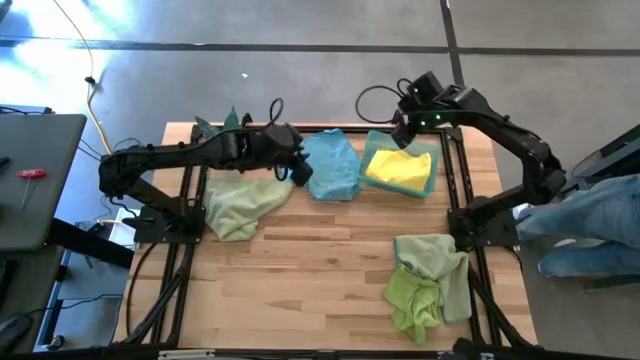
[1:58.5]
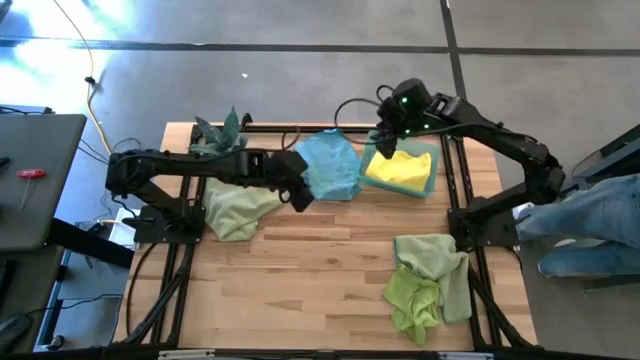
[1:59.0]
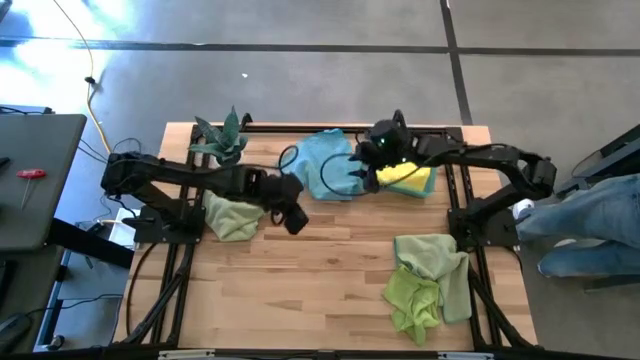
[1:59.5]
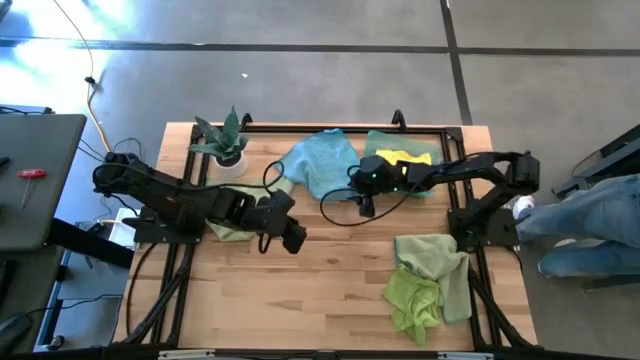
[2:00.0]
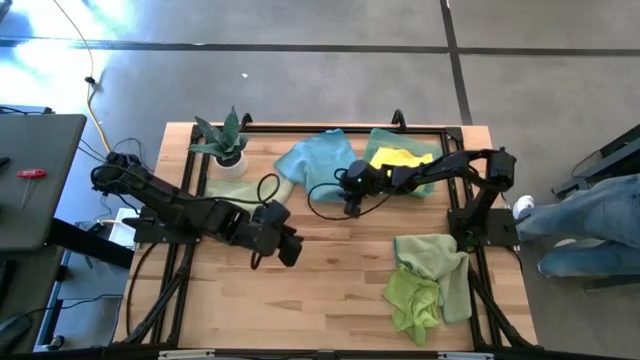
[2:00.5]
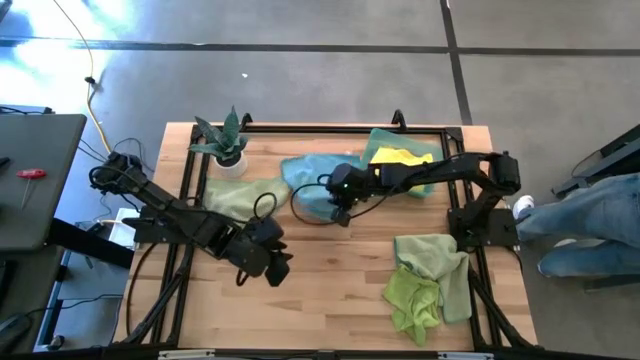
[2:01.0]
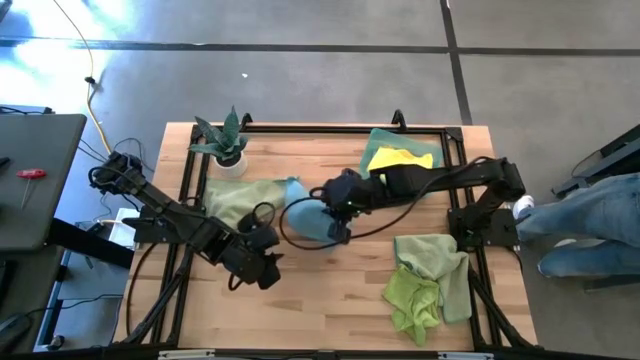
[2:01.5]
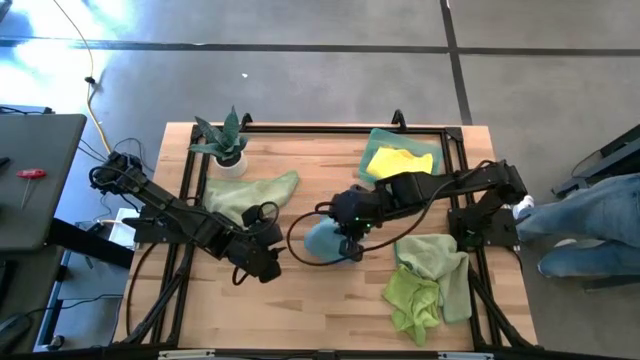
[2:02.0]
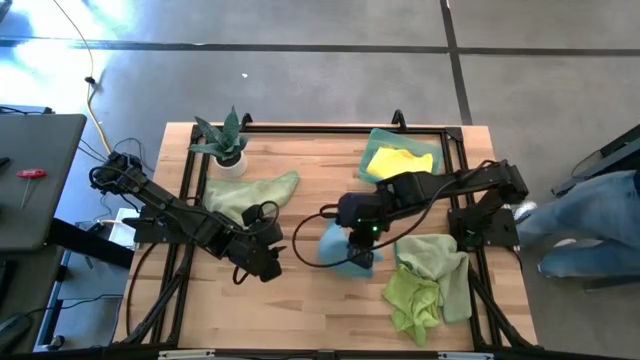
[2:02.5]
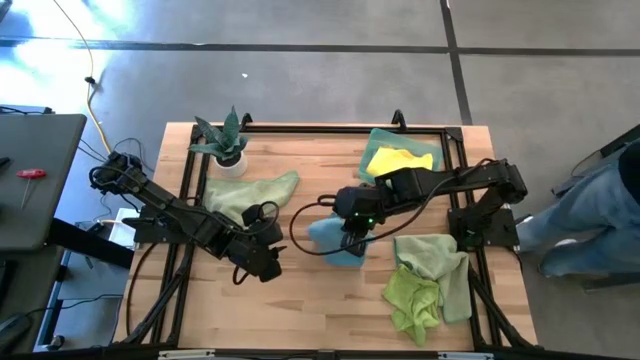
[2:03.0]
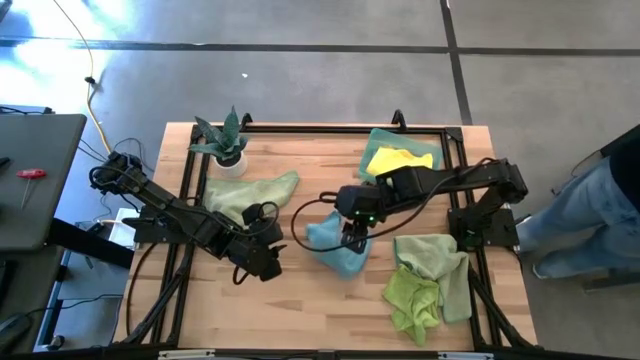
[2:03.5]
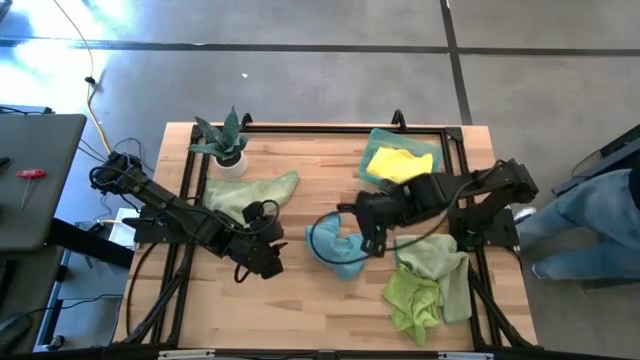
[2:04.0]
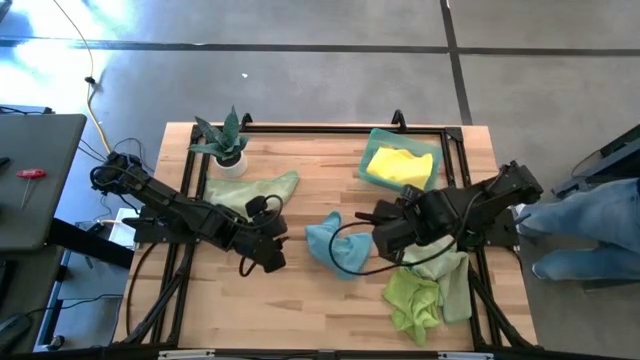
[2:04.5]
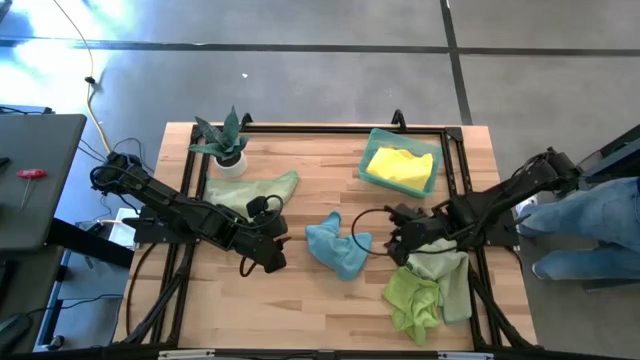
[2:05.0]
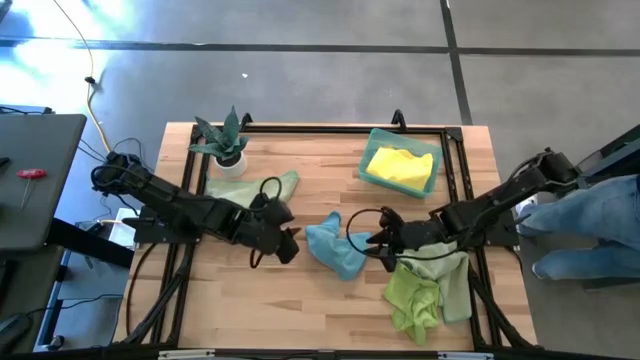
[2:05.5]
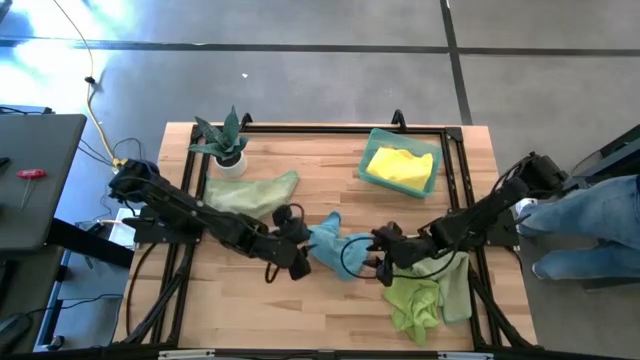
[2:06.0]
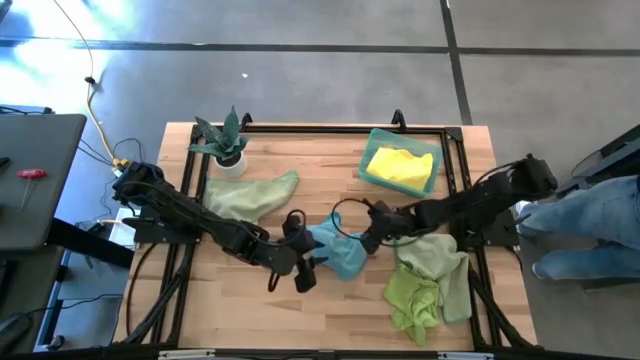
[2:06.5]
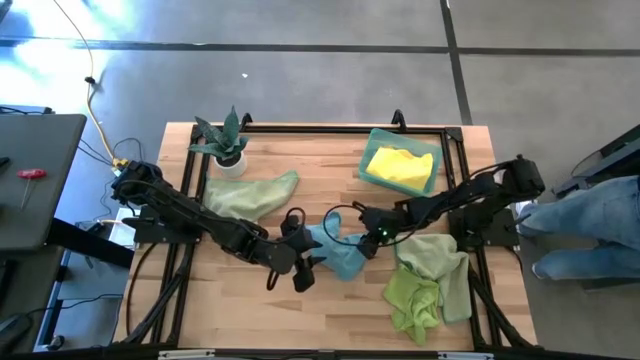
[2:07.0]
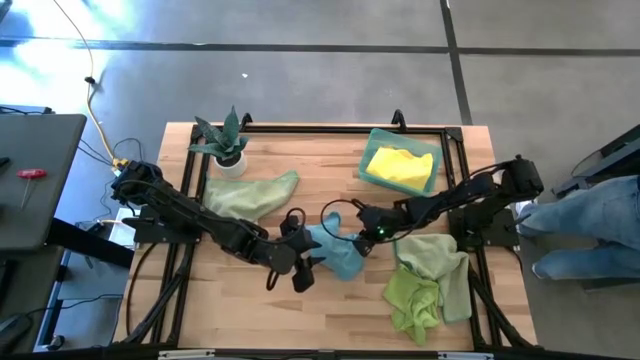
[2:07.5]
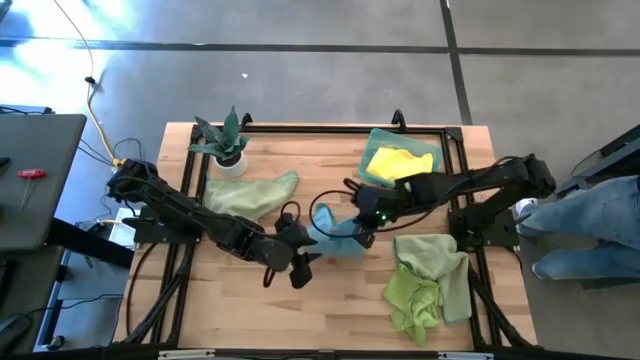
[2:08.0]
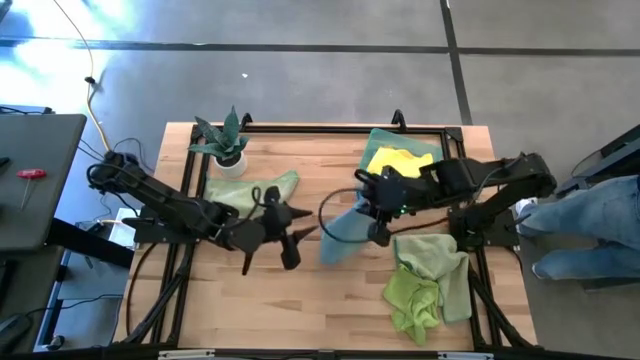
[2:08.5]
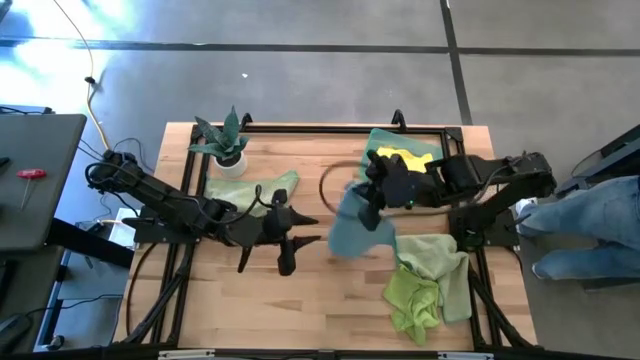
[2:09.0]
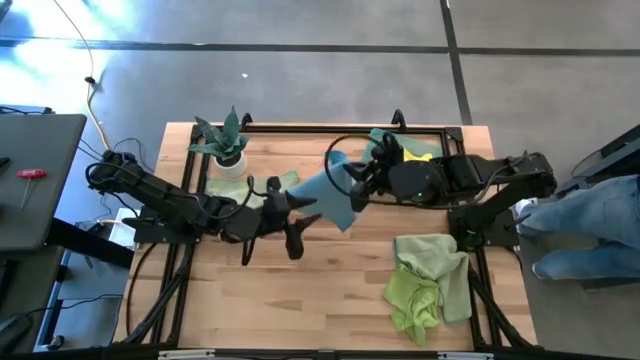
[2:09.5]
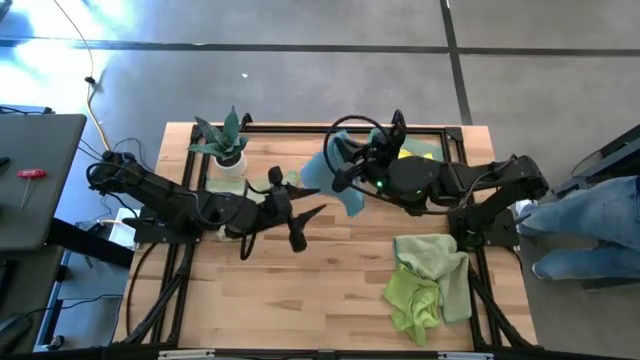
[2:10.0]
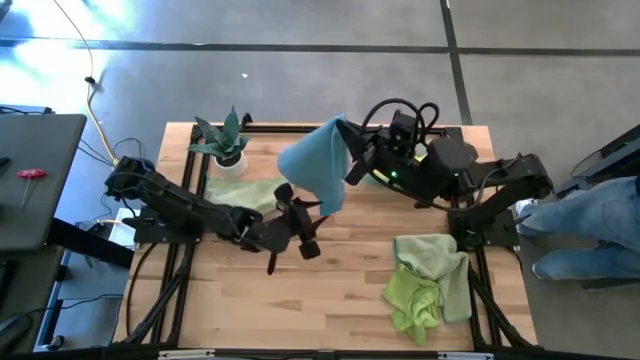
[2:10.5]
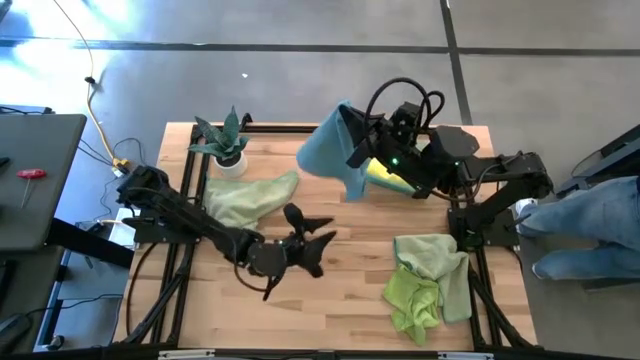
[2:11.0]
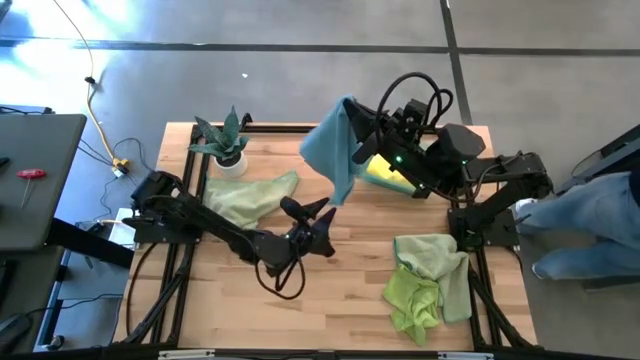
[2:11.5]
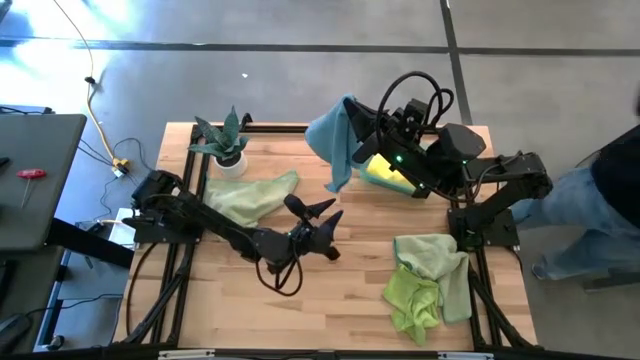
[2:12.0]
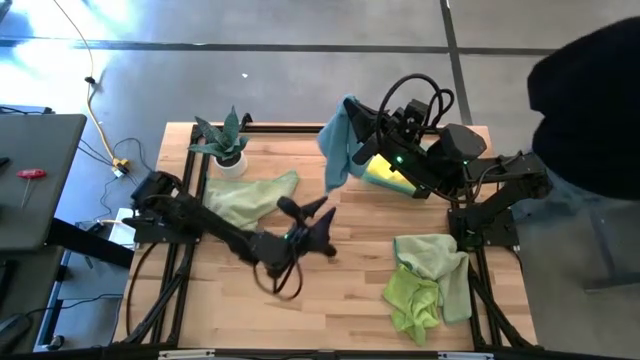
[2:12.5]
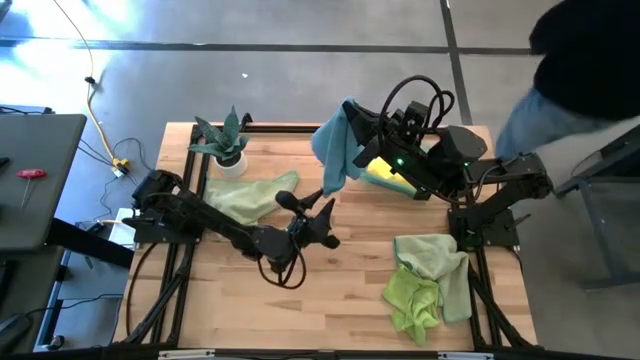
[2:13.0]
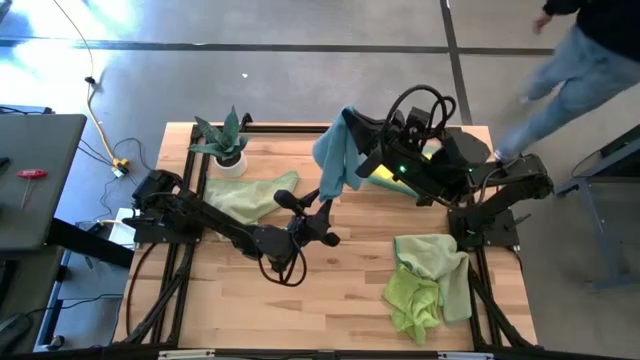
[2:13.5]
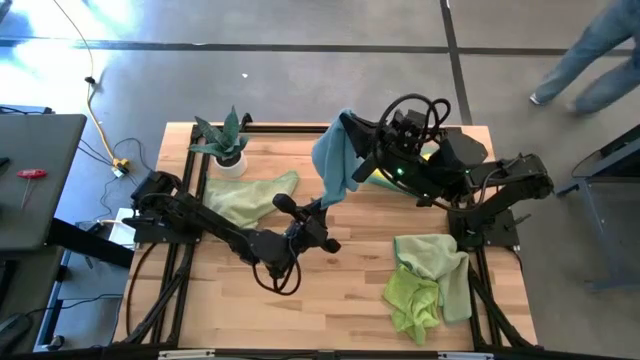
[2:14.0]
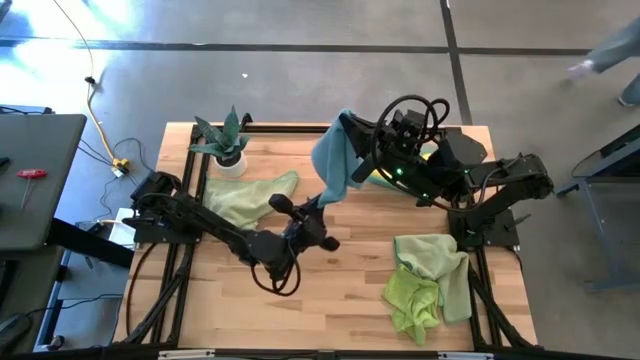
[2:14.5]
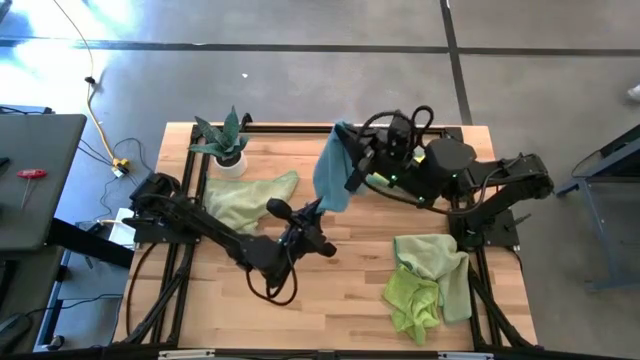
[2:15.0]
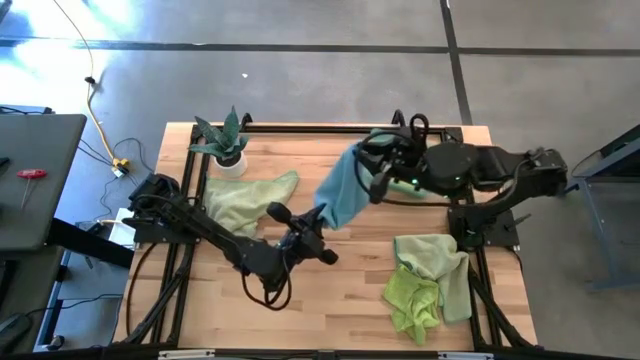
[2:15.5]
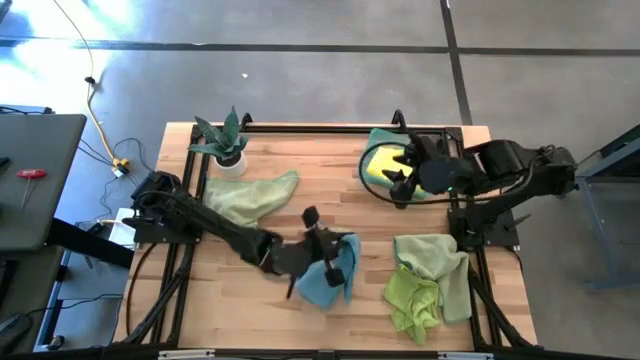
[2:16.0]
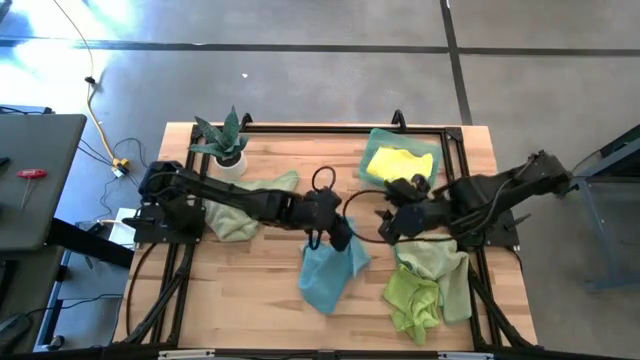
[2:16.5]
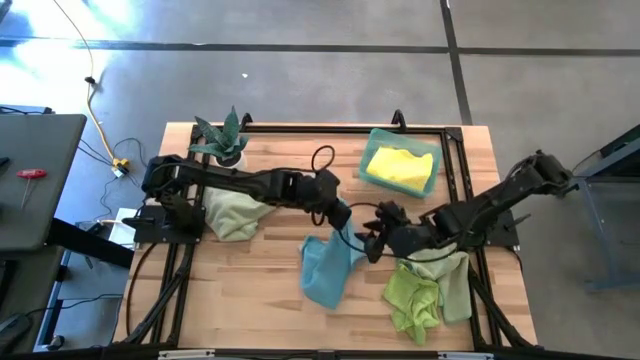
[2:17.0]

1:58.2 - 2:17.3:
Task: Fold microfiber towels
Fold the blue microfiber cloth

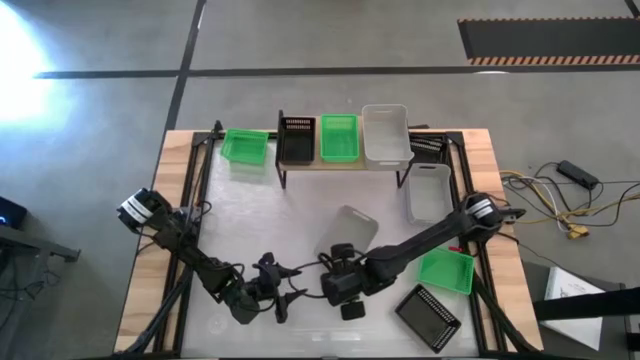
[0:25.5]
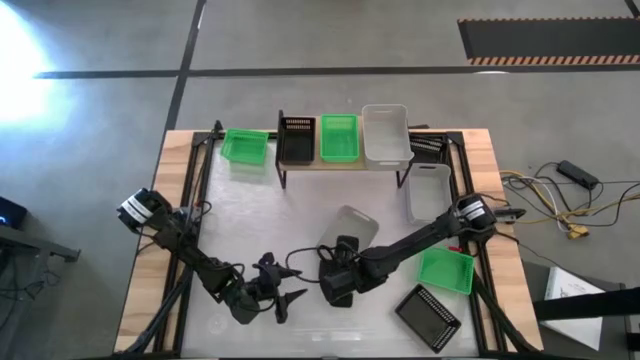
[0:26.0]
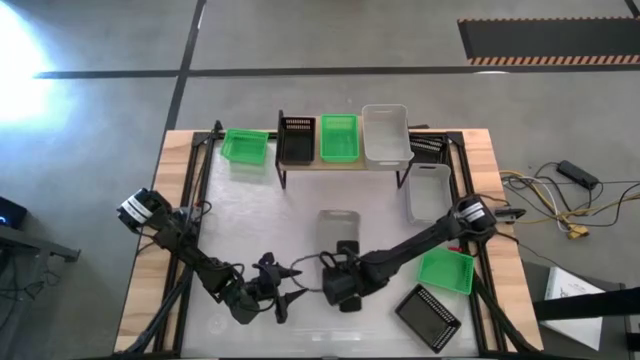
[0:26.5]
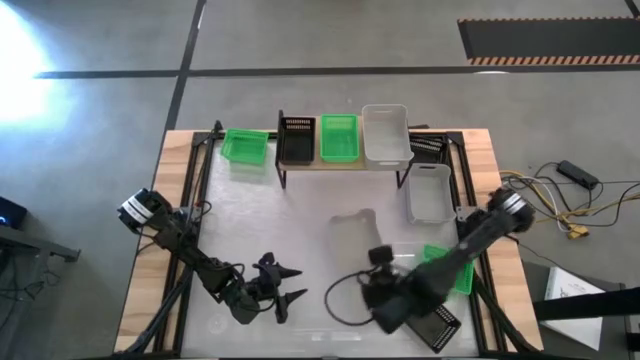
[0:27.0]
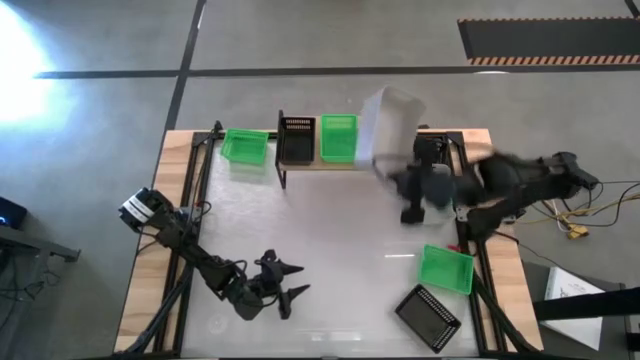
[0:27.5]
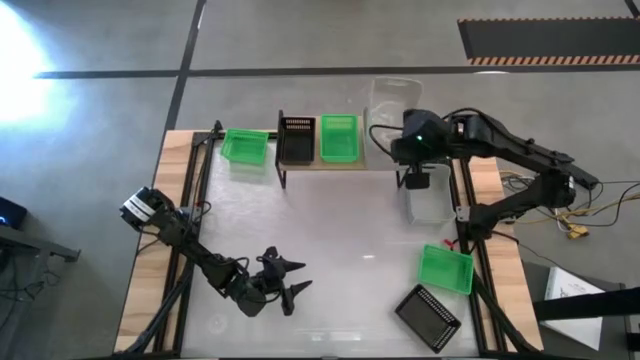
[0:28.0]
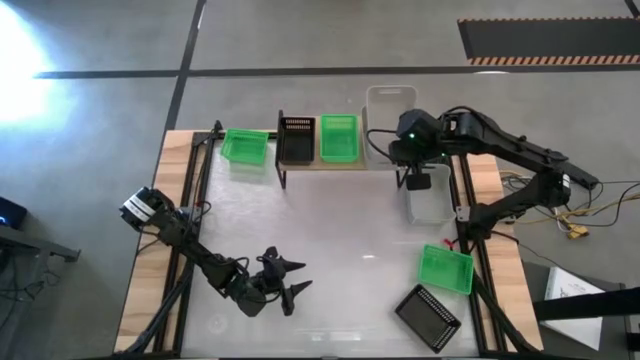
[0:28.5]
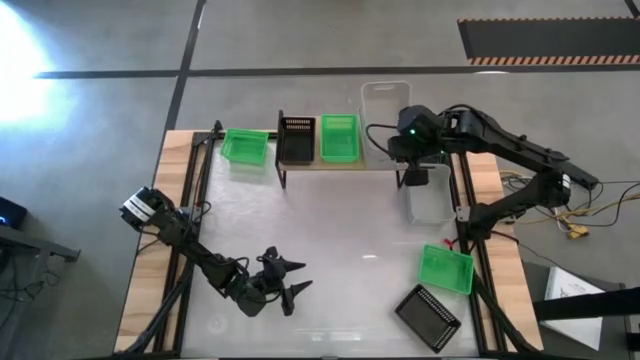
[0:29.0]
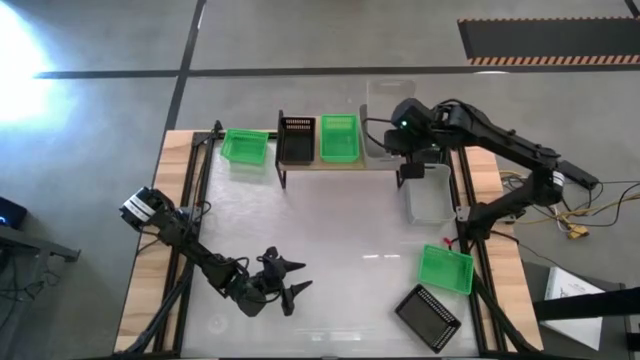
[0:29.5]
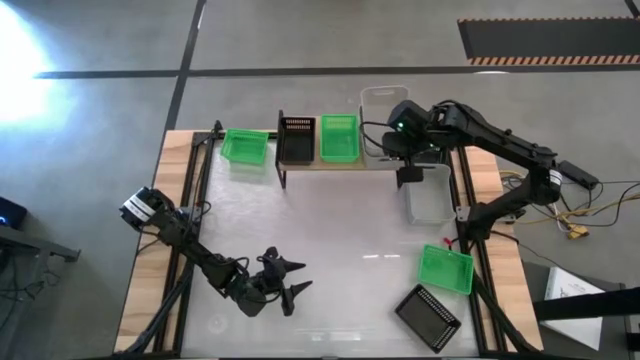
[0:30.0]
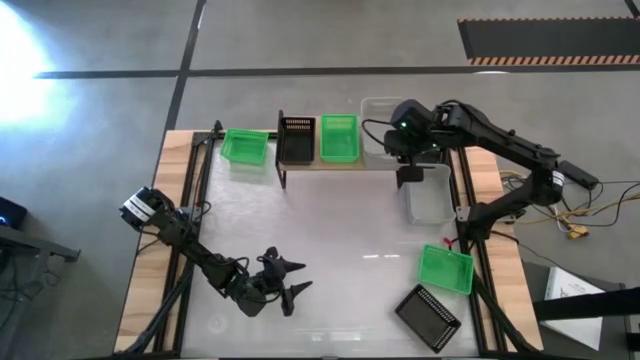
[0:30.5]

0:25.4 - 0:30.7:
Task: Stack baskets on shelf by color
Stack the left white bin on top of the white bin on the shelf
